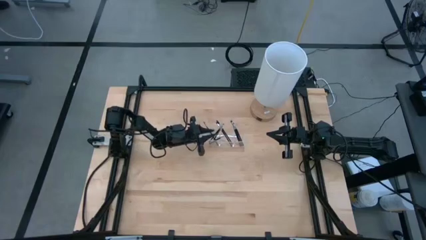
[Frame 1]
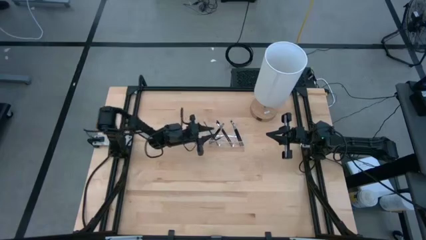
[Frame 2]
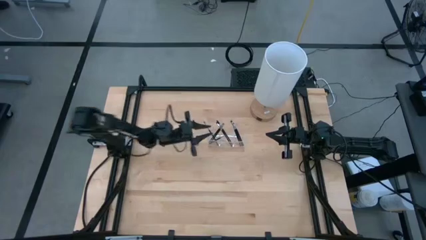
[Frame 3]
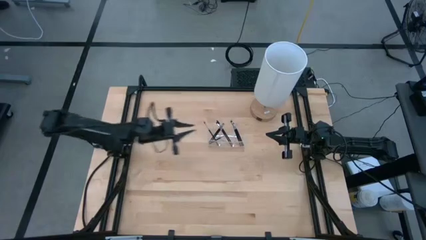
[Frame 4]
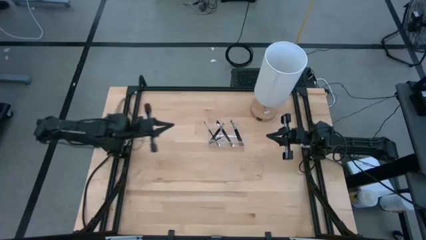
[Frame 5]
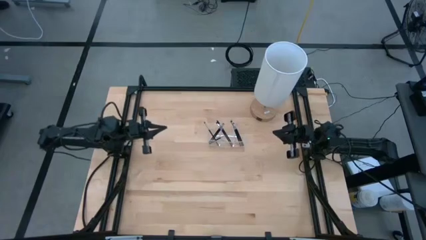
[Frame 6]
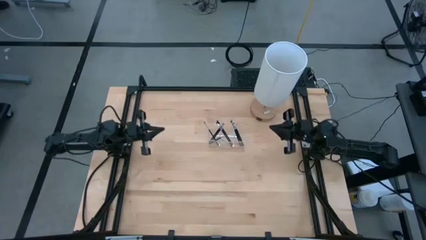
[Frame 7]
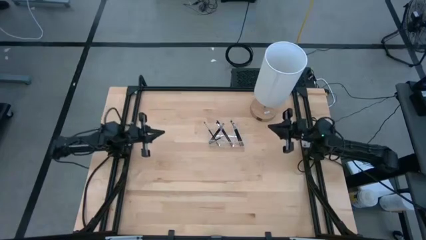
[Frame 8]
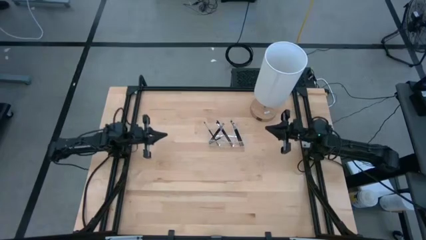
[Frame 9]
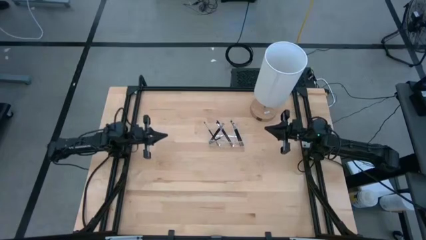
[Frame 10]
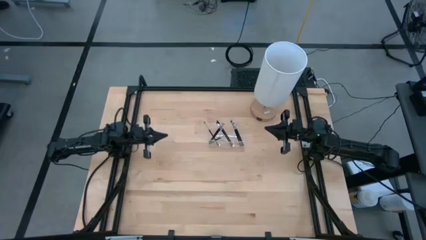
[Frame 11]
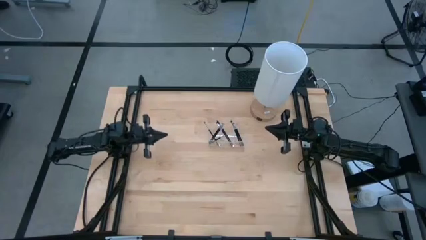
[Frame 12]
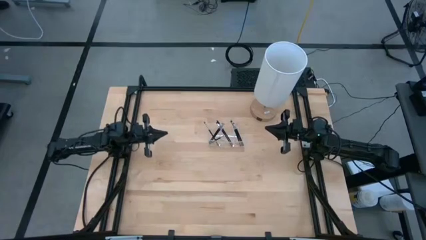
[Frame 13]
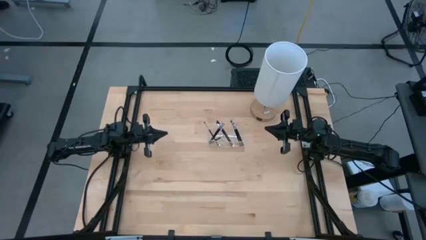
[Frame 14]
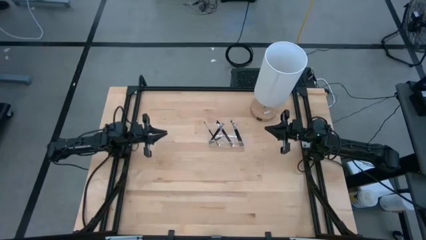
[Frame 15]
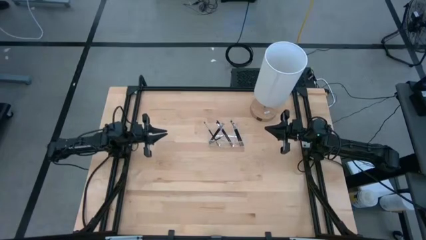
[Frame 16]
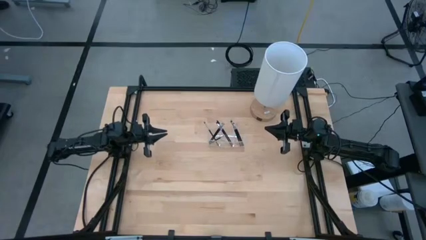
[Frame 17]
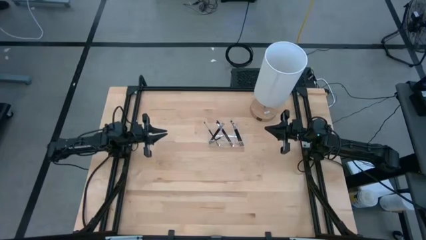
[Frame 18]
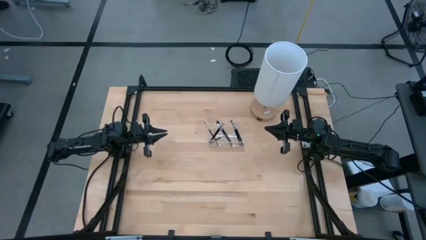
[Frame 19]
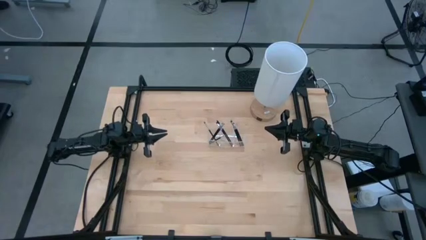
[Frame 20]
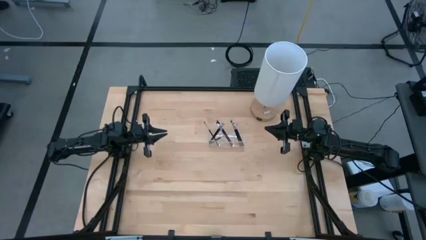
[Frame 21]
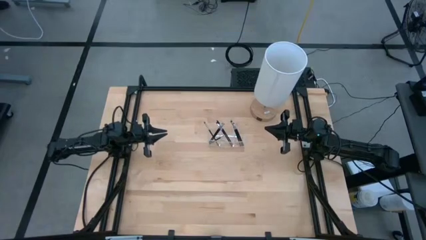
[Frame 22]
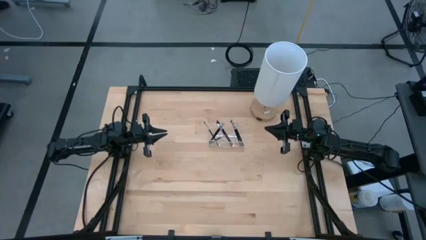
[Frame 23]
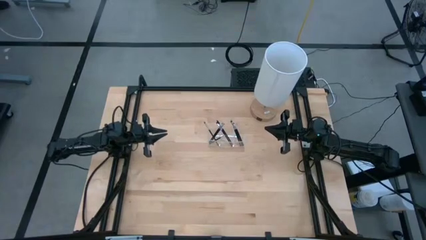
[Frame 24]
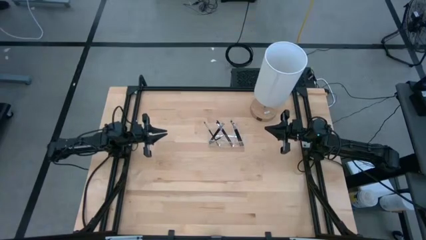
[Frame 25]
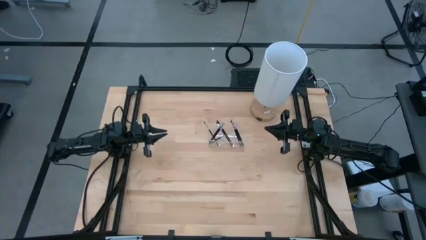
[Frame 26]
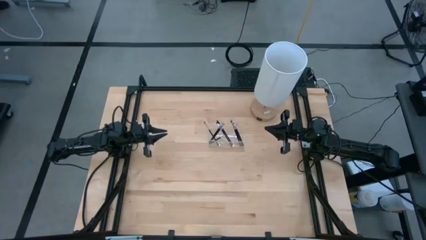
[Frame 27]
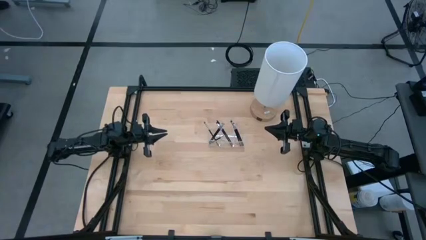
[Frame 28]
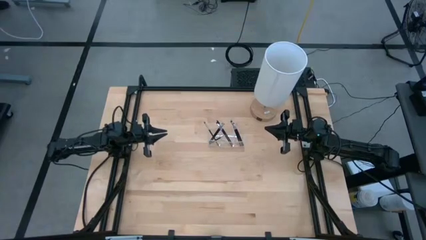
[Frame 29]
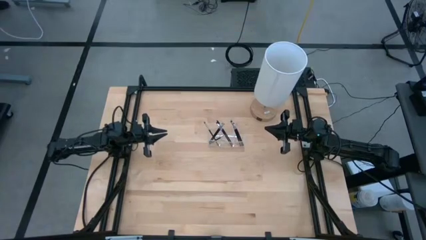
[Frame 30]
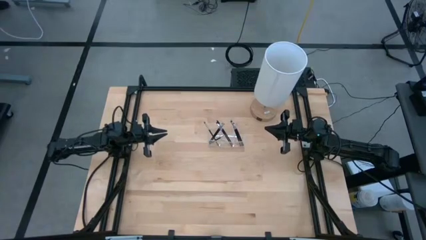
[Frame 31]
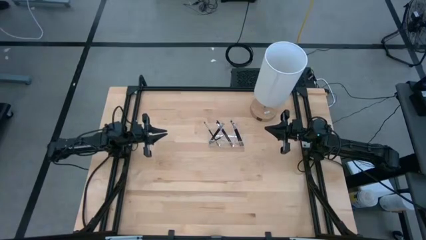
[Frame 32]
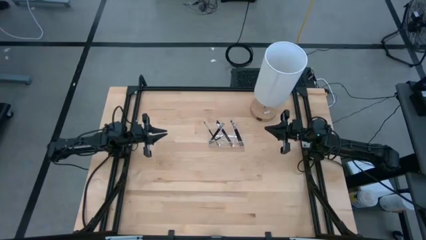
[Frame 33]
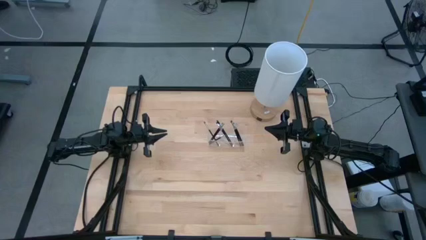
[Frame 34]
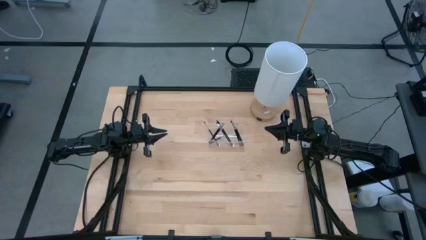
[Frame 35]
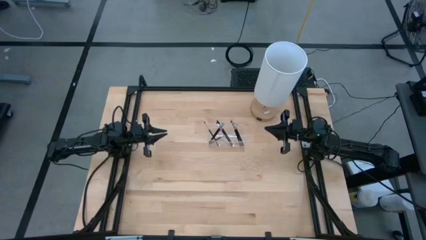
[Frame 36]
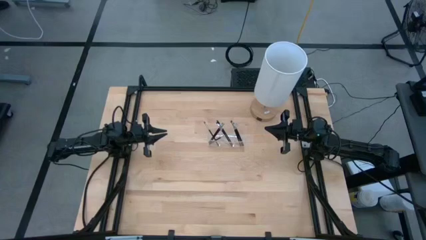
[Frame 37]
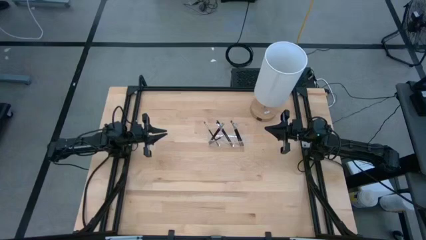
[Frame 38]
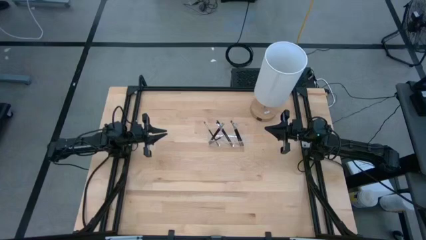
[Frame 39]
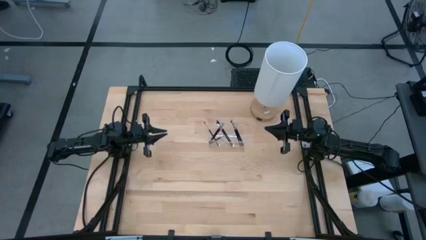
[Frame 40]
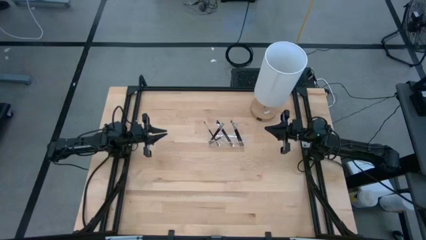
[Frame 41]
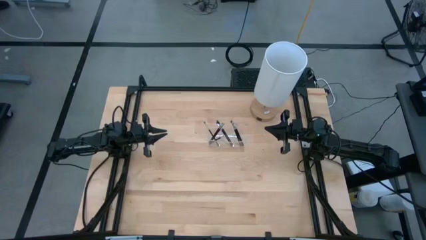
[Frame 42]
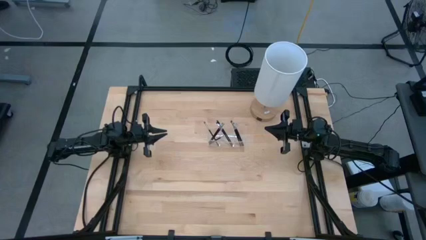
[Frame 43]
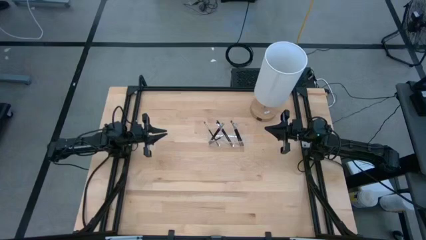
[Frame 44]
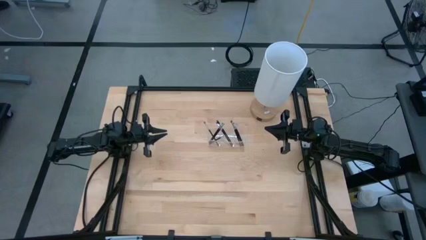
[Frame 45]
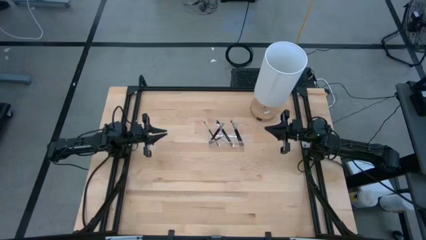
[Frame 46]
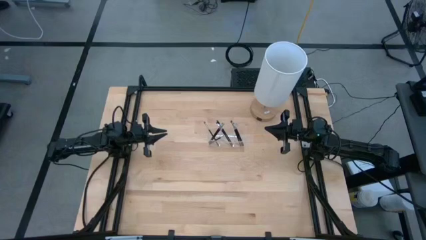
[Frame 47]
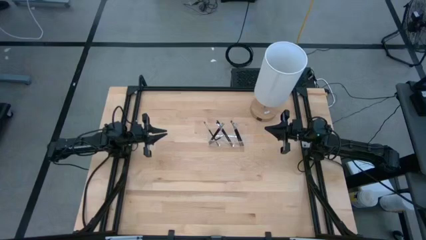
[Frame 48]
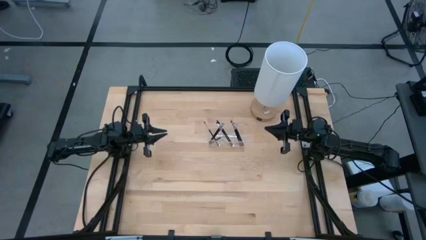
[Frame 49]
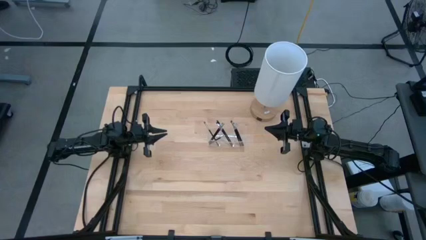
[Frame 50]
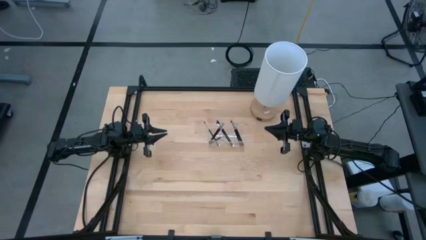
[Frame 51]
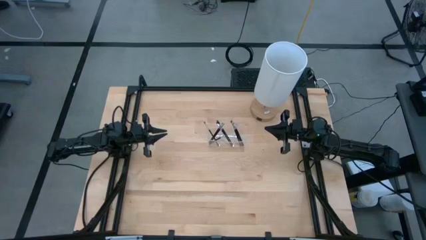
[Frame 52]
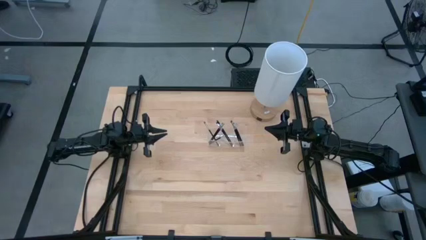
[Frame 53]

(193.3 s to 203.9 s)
Task: Put items in baskets/containers
Return to Home Position

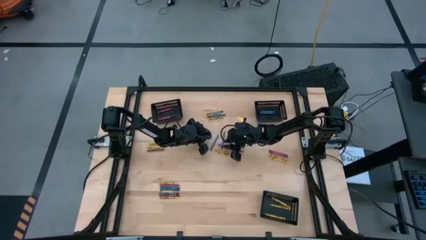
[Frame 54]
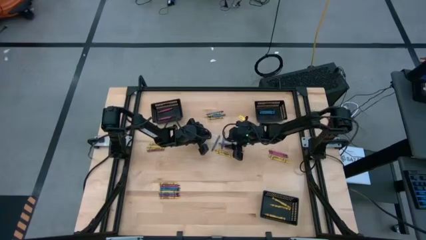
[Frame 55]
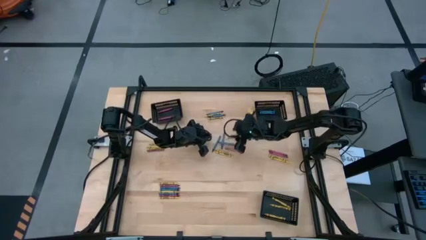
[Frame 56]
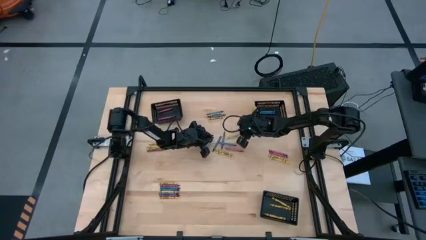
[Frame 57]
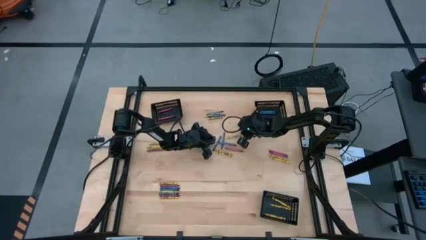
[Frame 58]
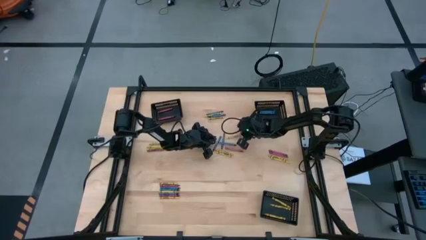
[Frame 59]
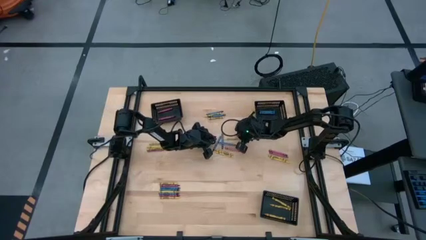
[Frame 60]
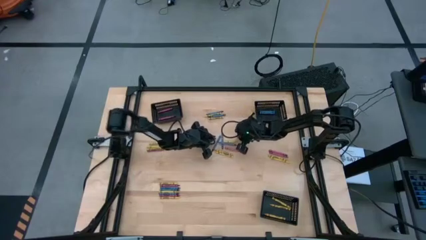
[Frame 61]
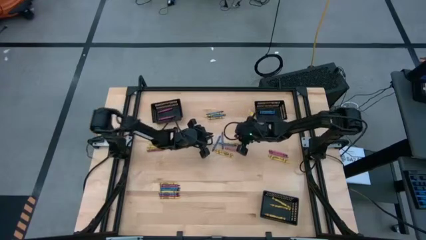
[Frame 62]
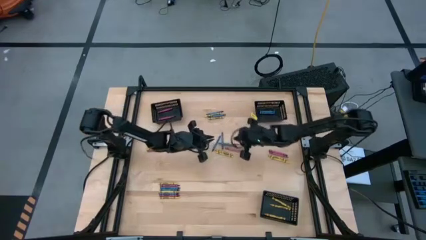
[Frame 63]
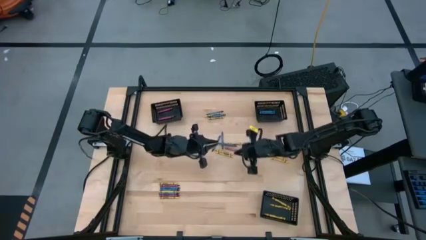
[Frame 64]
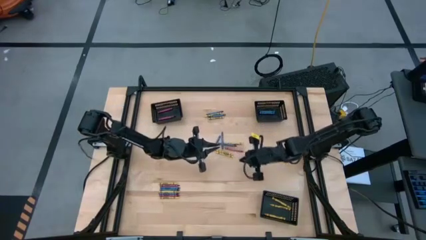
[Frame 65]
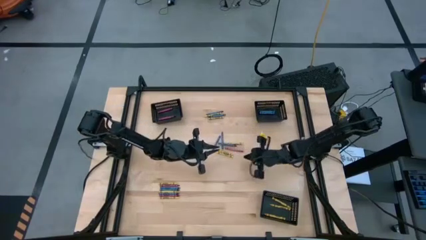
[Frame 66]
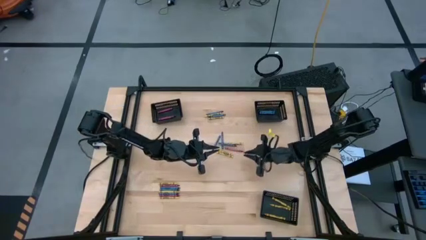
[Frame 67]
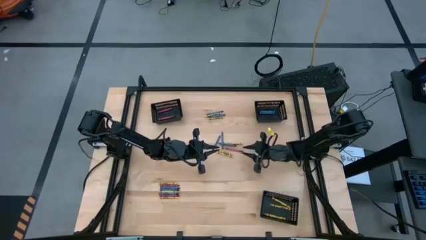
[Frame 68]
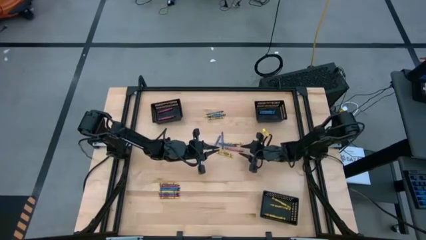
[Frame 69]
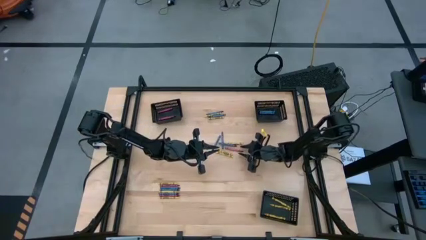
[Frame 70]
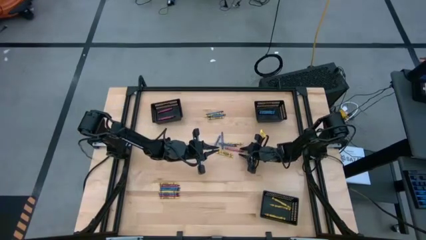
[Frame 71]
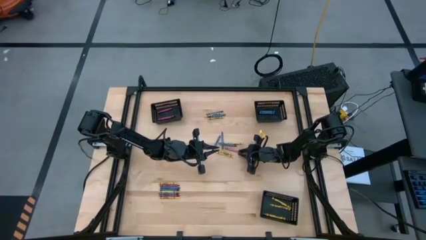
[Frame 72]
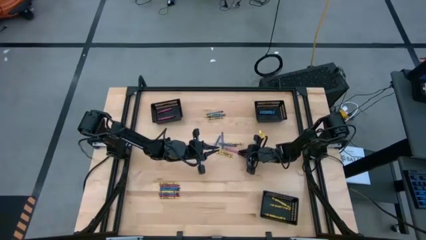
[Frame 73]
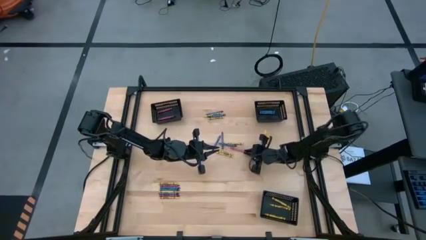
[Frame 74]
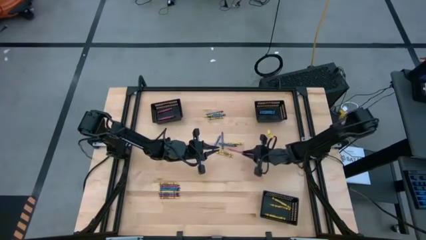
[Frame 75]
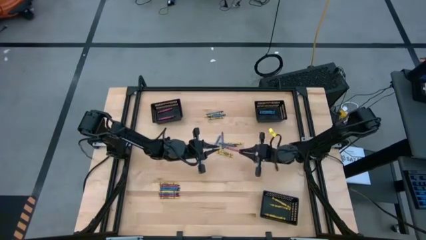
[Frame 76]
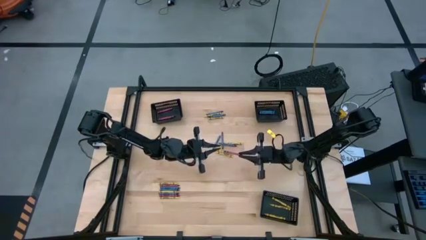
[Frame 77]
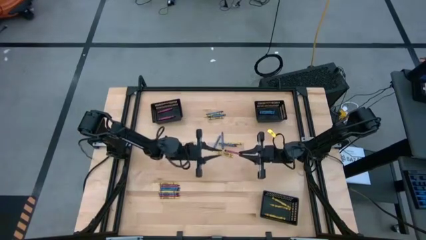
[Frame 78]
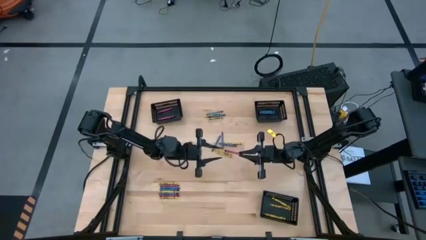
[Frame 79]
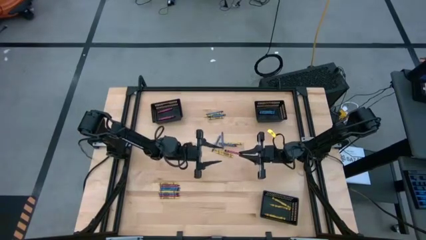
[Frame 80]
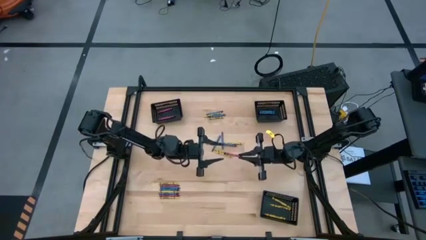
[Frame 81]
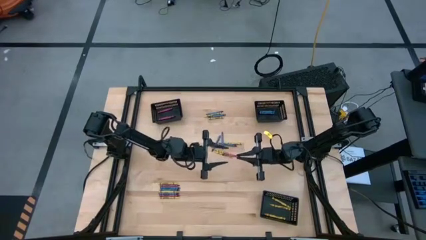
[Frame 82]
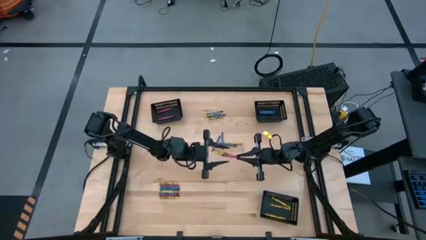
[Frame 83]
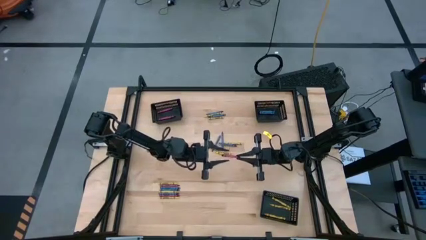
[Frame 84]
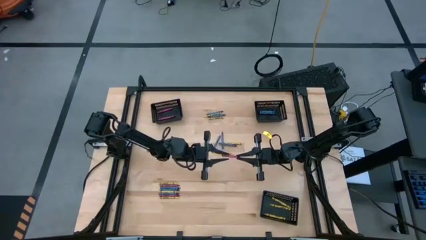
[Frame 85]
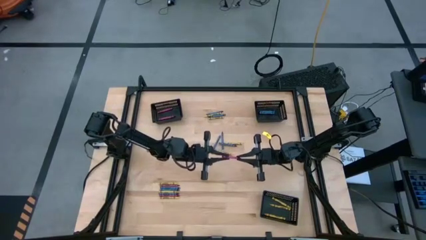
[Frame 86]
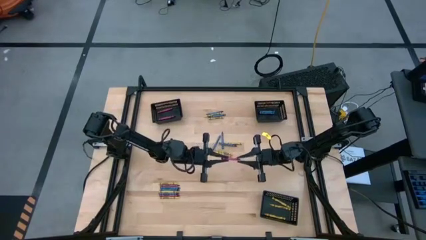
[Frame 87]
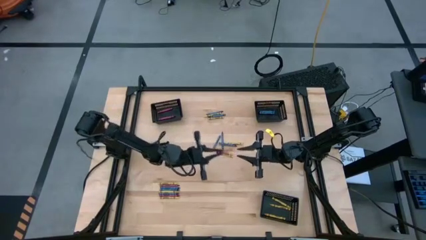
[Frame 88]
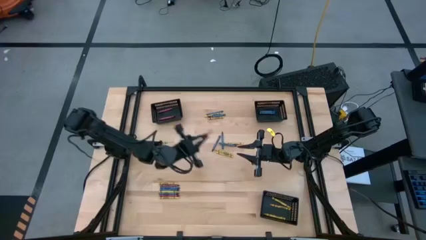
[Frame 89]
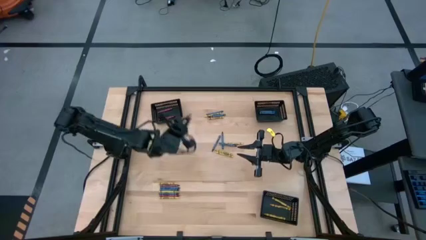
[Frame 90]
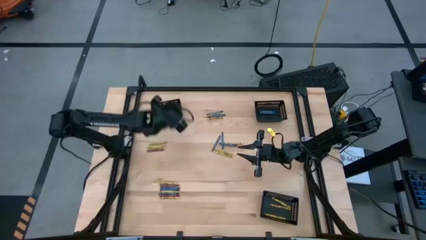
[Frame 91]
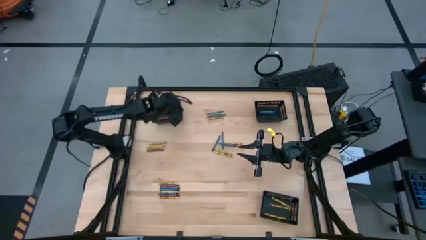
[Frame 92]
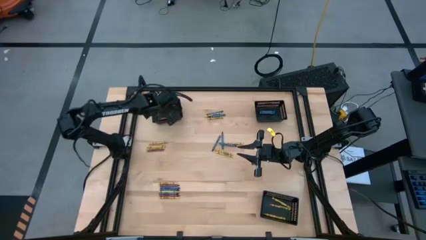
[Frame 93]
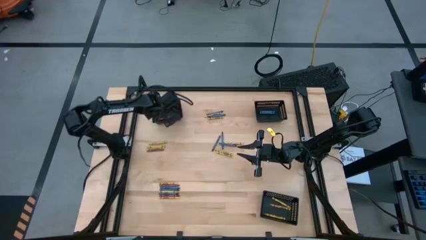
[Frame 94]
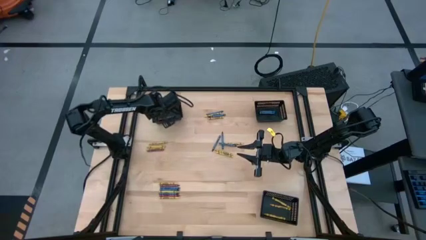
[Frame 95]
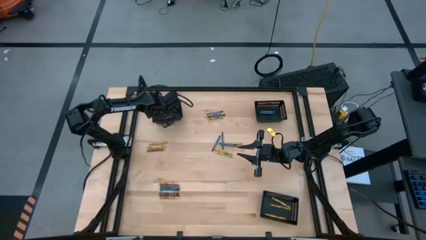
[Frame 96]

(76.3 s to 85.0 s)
Task: Sort crayons
Put the red crayon into the top left black bin
